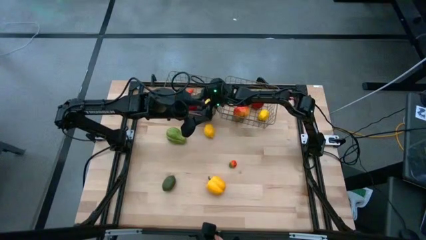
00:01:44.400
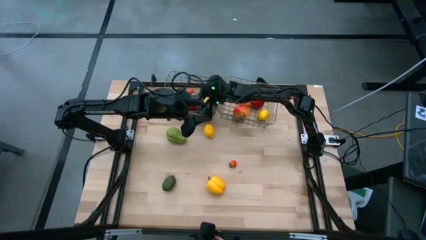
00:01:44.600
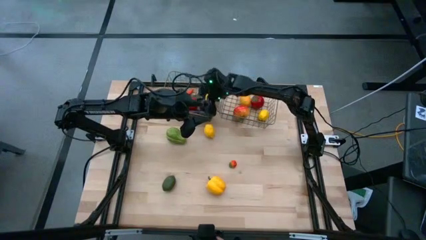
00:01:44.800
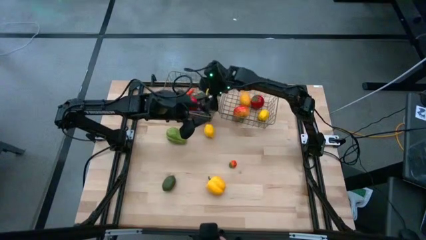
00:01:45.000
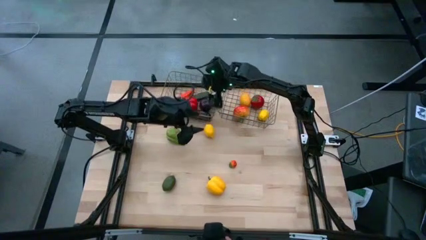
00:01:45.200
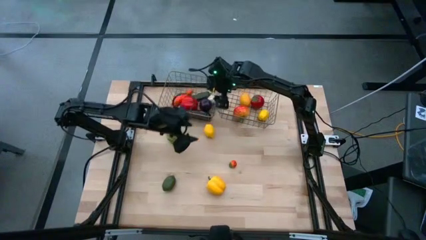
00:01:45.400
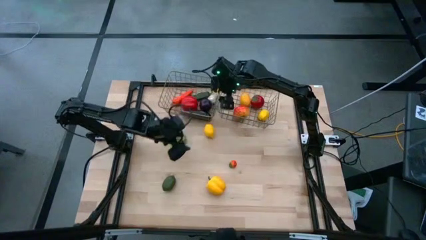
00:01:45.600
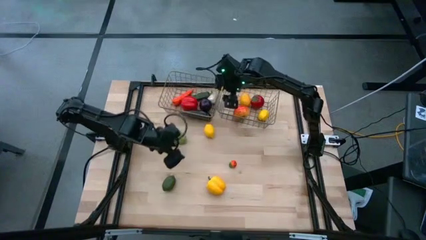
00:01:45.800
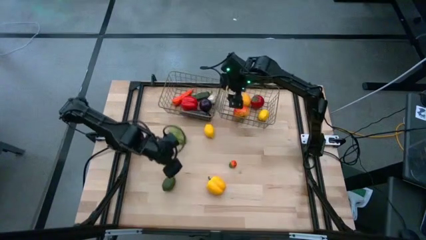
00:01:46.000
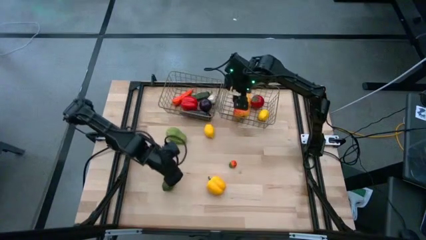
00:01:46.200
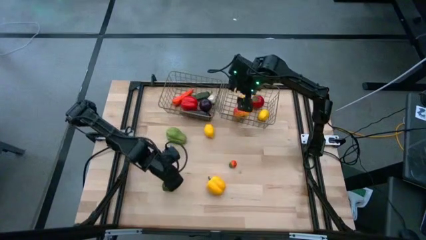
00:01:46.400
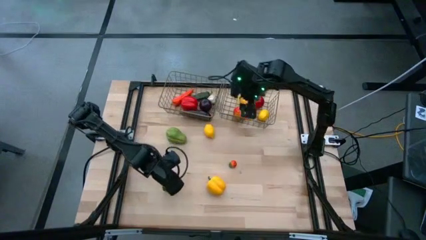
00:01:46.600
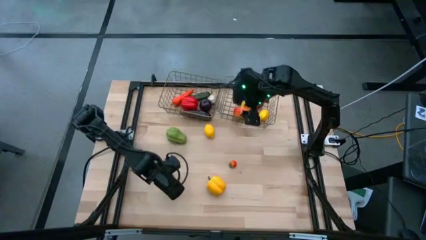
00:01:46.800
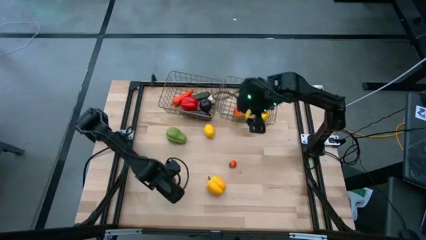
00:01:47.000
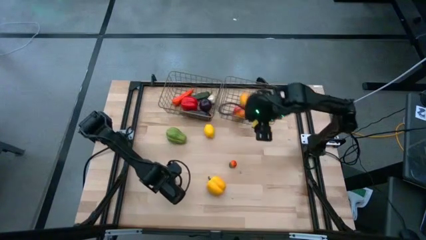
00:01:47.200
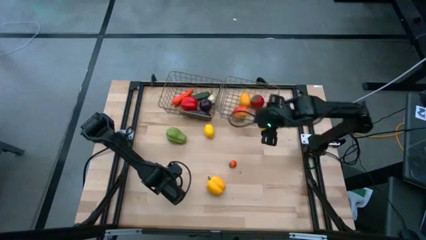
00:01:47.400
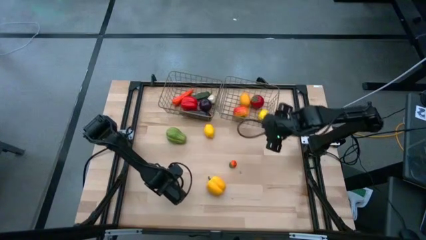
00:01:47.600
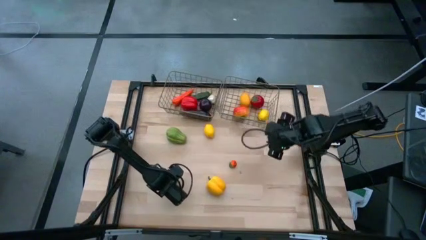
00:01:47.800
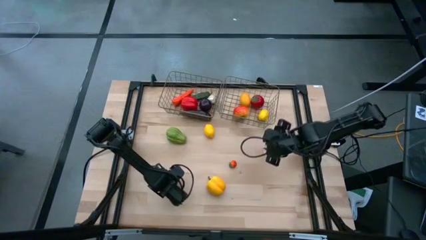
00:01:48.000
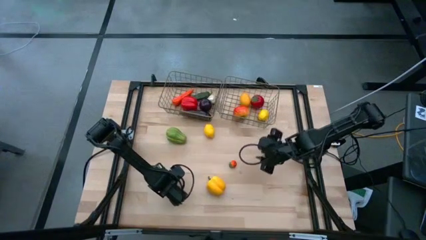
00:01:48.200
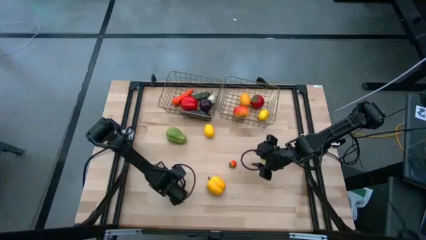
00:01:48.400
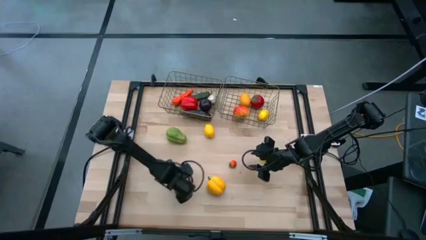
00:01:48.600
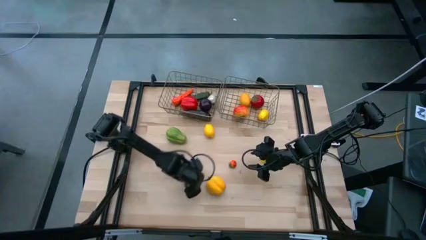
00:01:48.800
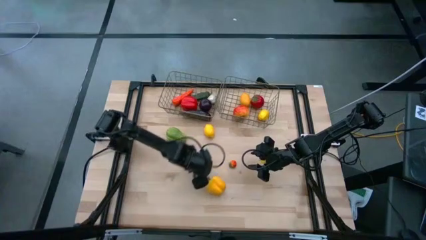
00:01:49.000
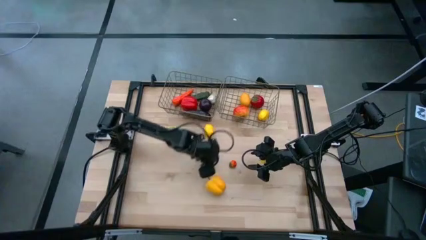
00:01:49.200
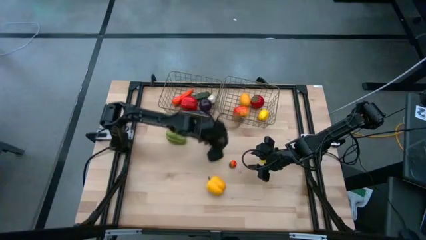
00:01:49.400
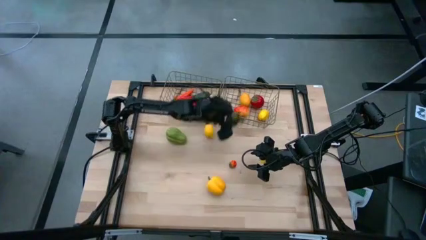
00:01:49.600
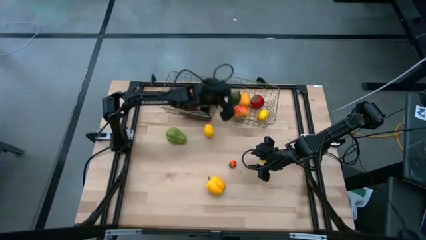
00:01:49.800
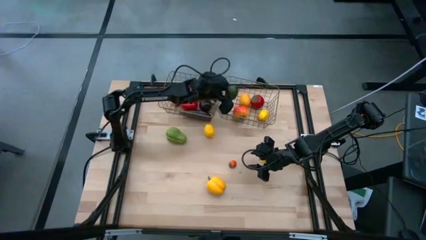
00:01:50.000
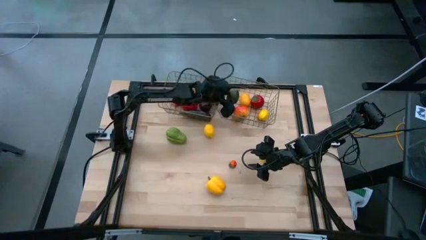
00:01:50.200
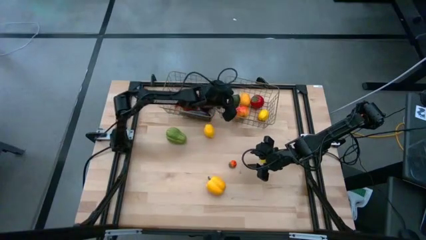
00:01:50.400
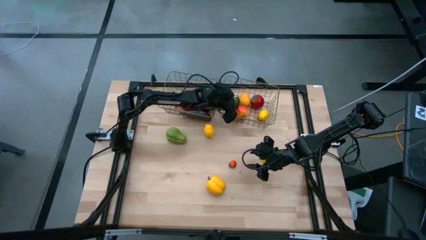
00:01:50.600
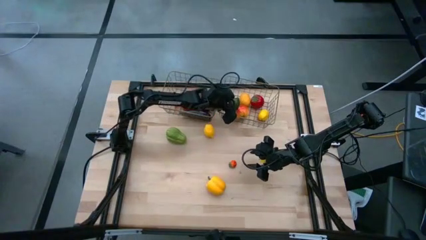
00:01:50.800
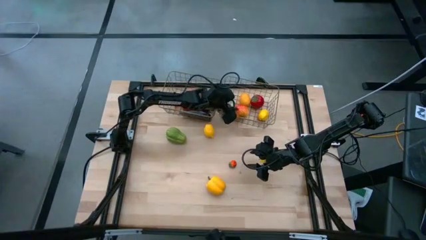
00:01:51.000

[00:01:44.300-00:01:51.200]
Task: Sort produce into baskets
Put the green lemon into the right golden wire basket

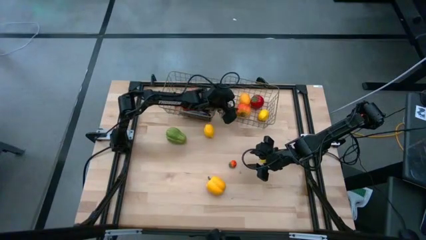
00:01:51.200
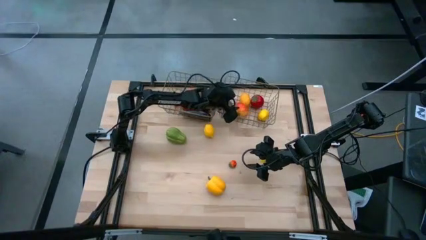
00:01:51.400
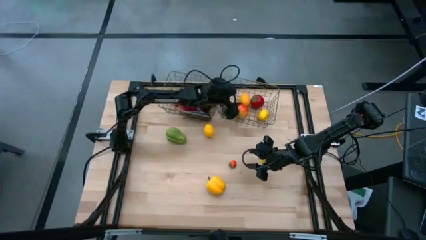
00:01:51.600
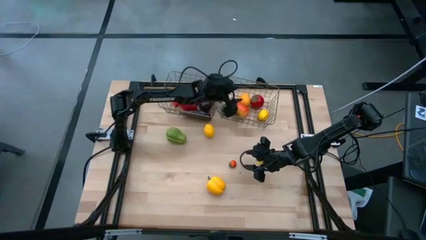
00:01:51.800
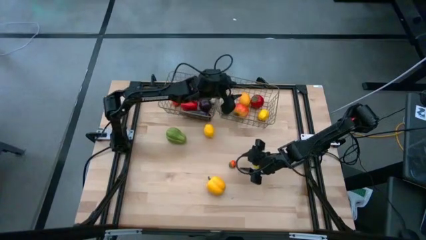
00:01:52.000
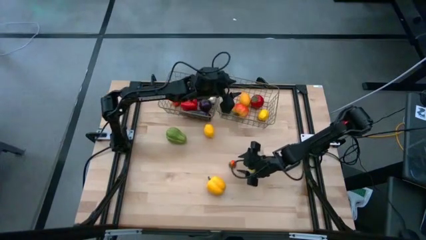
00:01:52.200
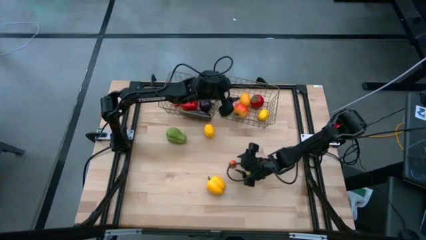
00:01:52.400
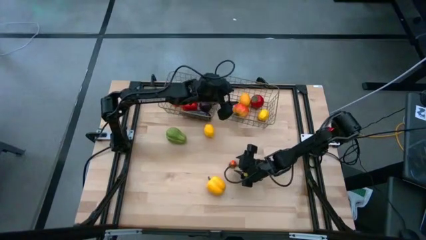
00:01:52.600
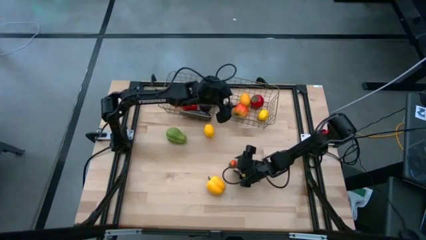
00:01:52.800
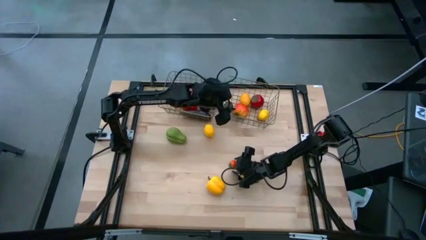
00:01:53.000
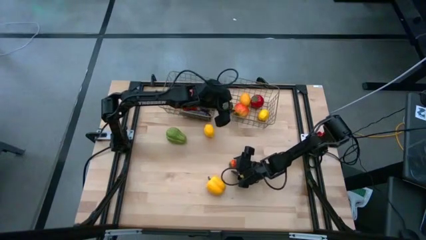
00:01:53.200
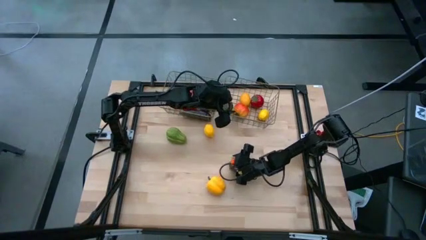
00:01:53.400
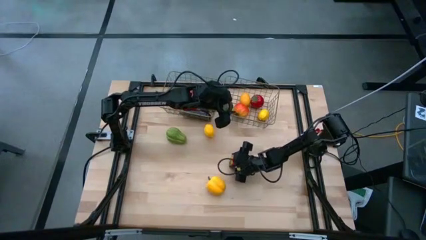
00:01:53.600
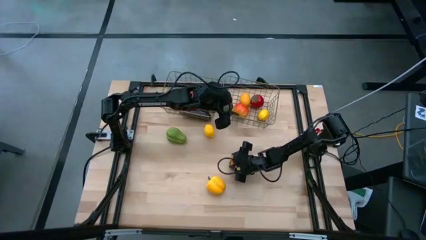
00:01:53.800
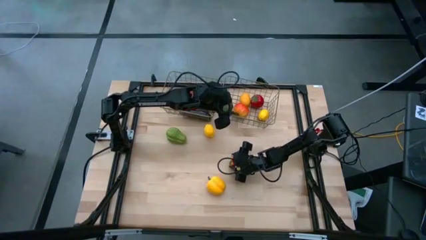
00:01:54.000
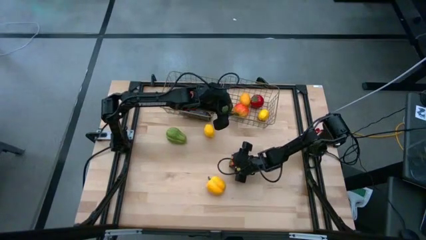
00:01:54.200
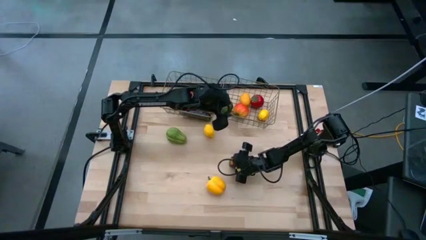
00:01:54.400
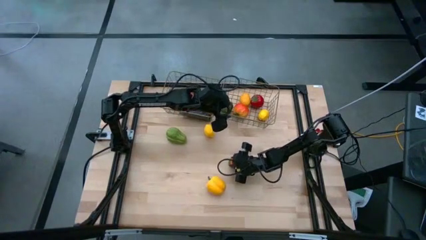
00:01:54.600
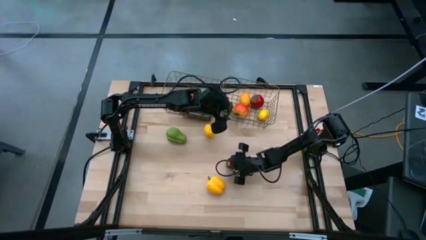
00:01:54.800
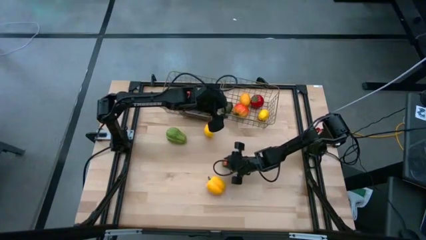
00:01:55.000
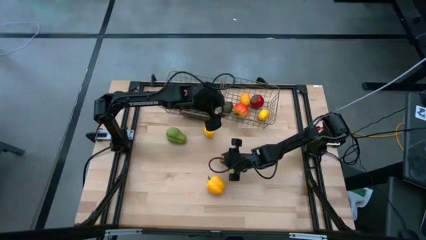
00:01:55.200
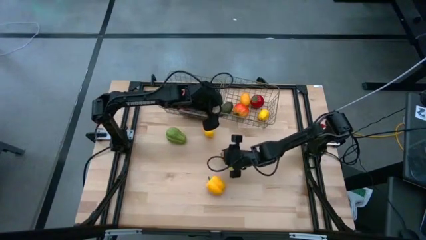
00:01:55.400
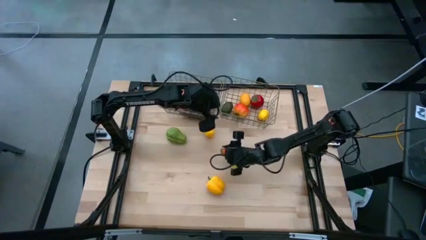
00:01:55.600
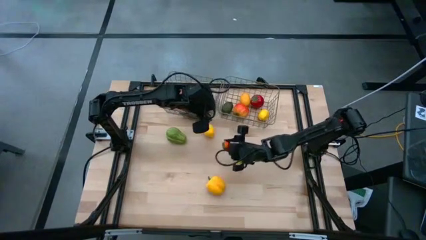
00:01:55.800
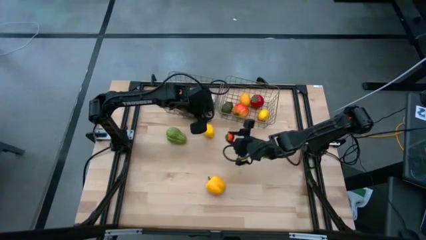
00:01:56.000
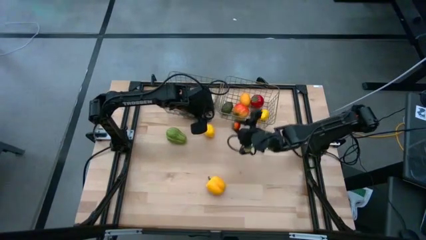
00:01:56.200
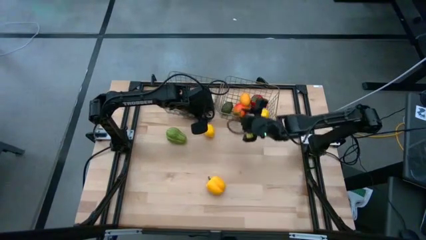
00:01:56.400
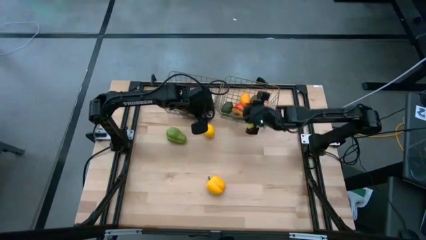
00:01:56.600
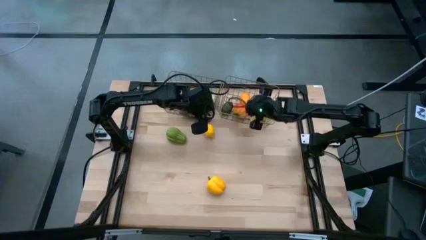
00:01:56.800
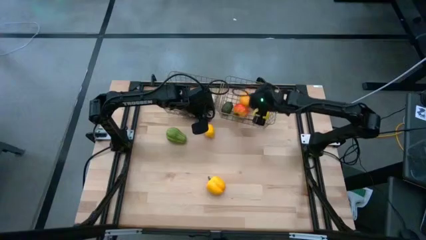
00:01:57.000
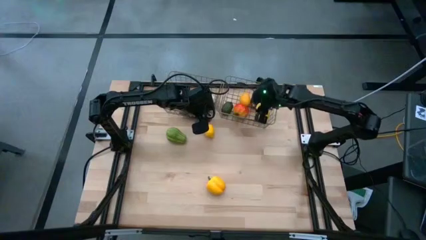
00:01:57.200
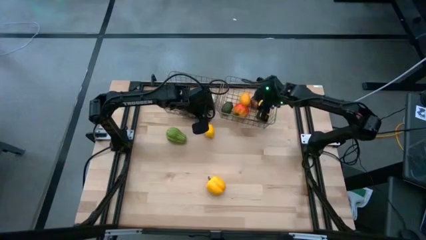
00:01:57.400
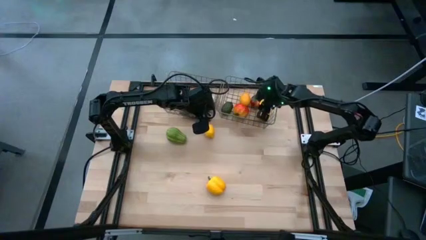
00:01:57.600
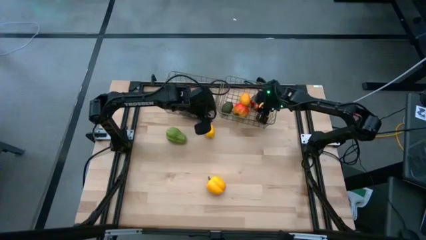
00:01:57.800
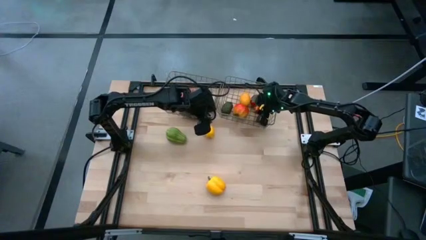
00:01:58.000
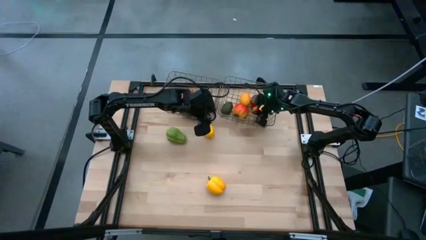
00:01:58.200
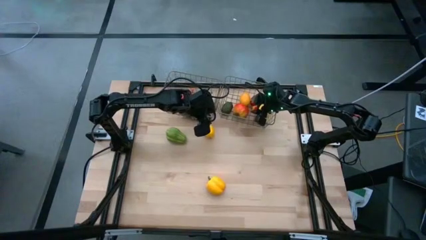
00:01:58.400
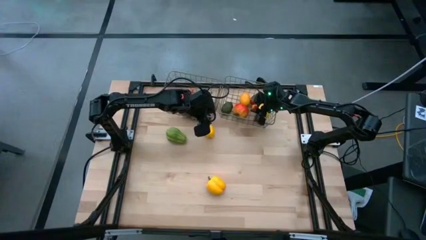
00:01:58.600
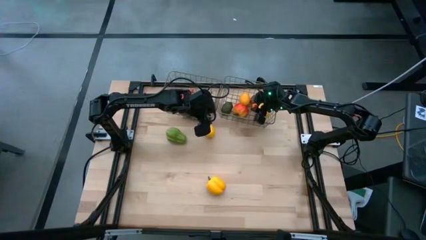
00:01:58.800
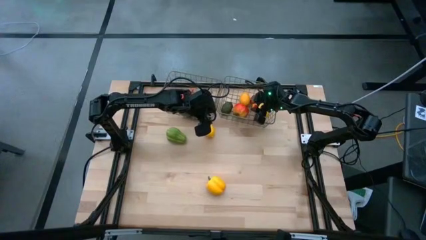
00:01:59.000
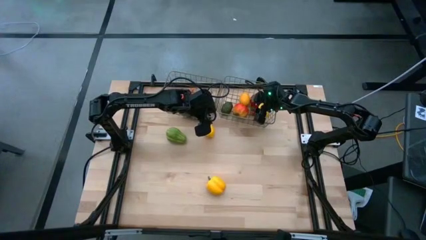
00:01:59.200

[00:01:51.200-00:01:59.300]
Put the small red tomato into the right golden wire basket
